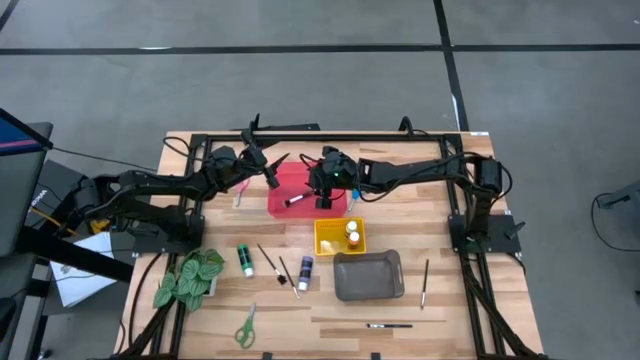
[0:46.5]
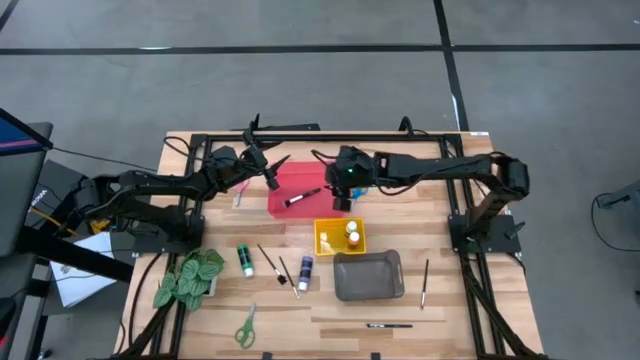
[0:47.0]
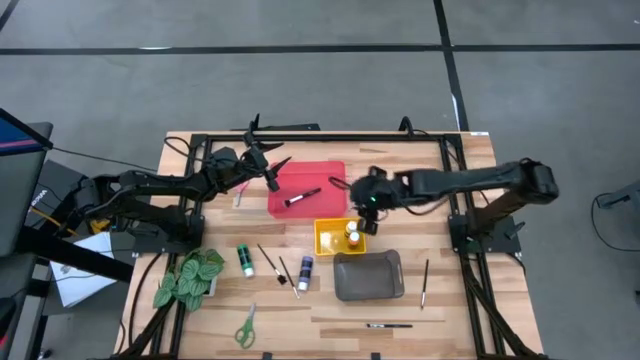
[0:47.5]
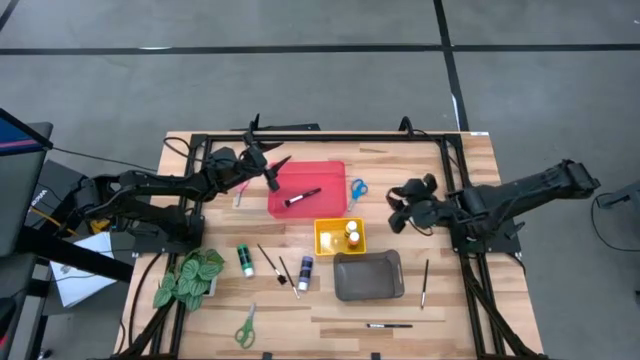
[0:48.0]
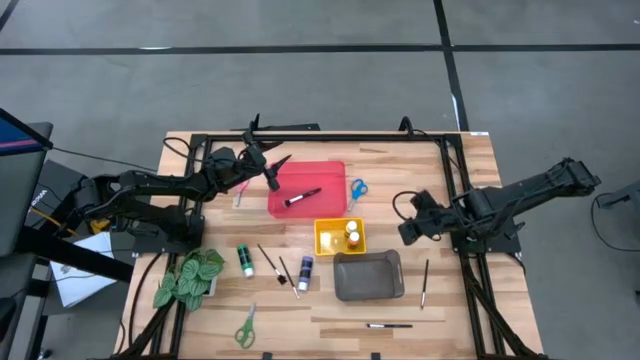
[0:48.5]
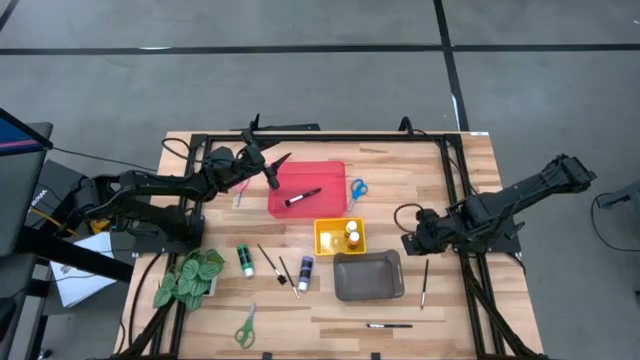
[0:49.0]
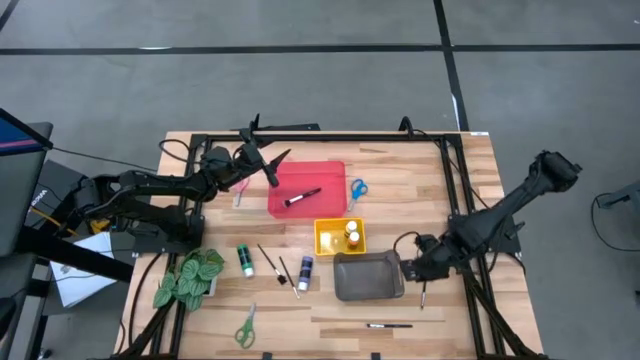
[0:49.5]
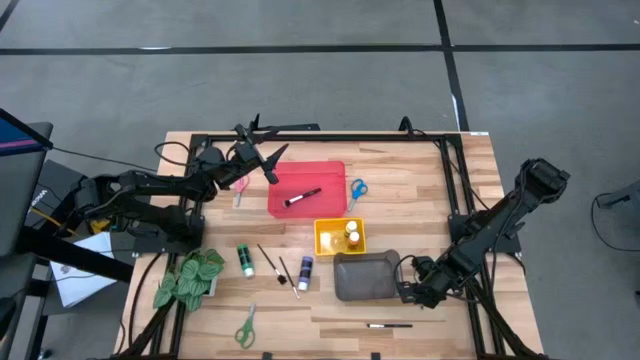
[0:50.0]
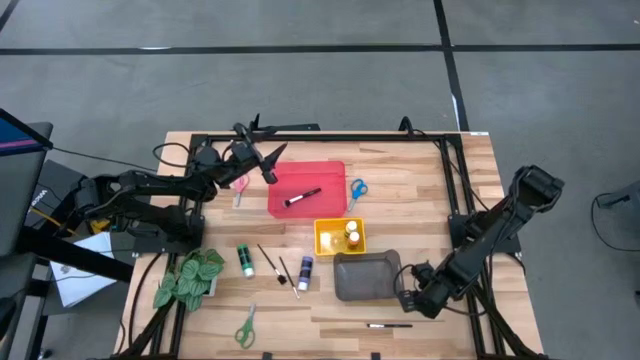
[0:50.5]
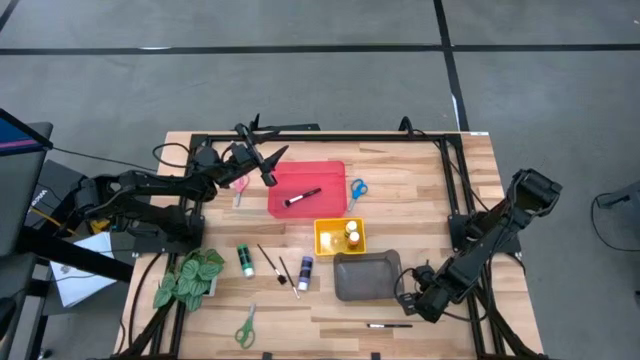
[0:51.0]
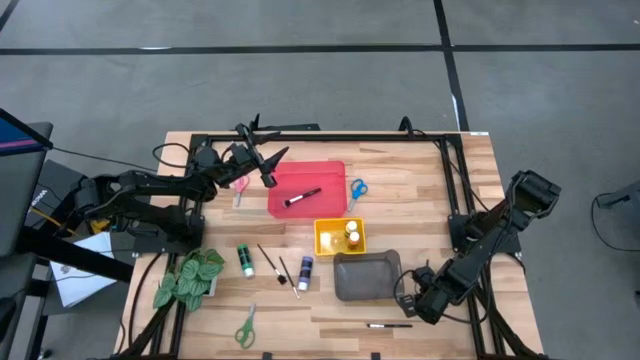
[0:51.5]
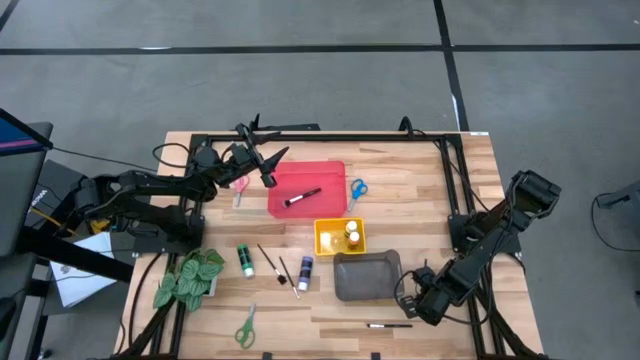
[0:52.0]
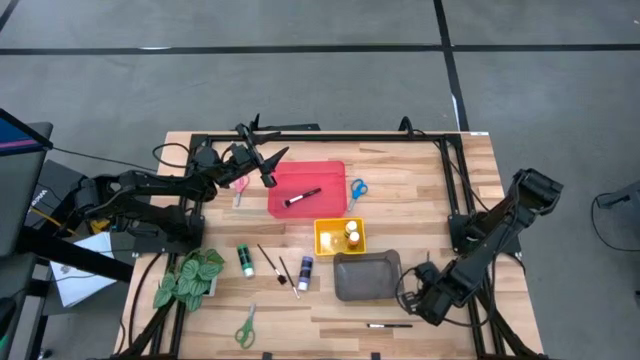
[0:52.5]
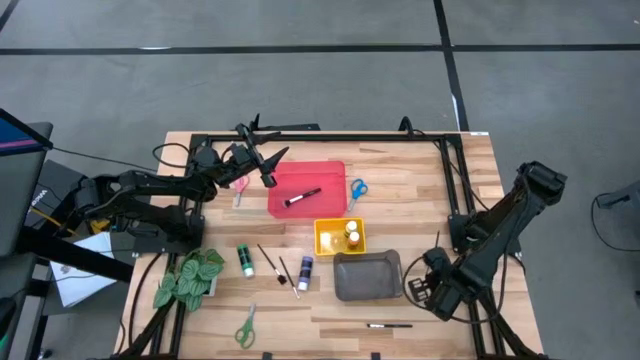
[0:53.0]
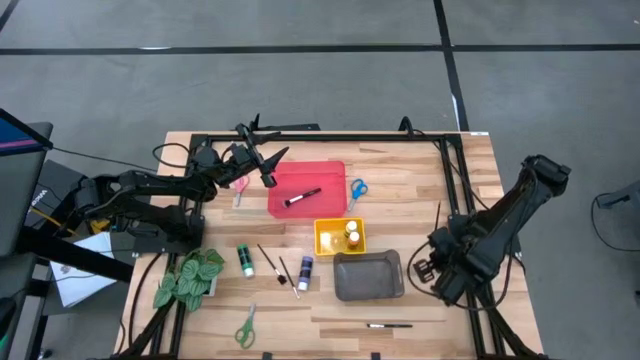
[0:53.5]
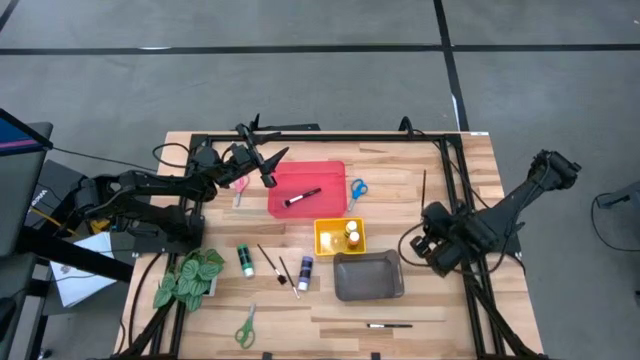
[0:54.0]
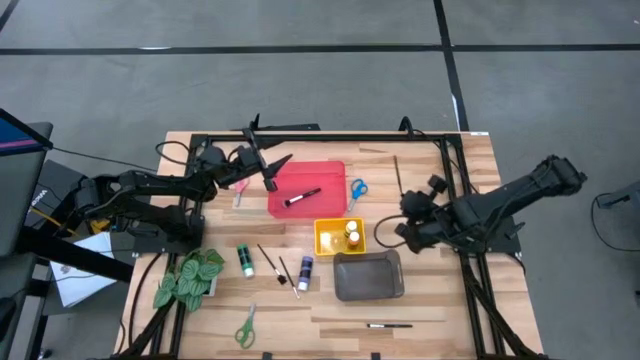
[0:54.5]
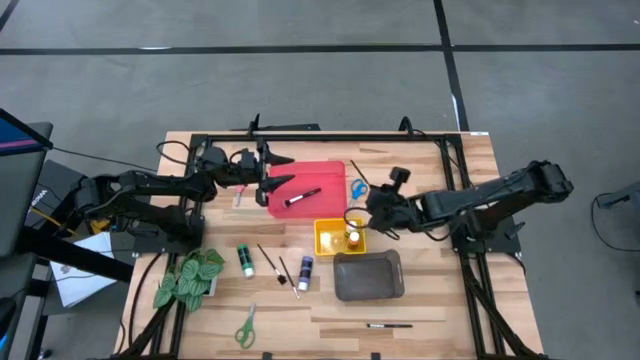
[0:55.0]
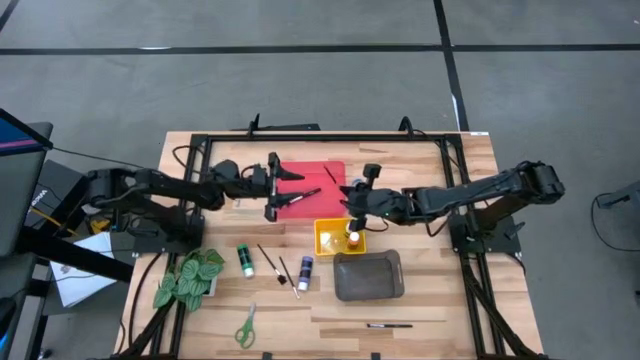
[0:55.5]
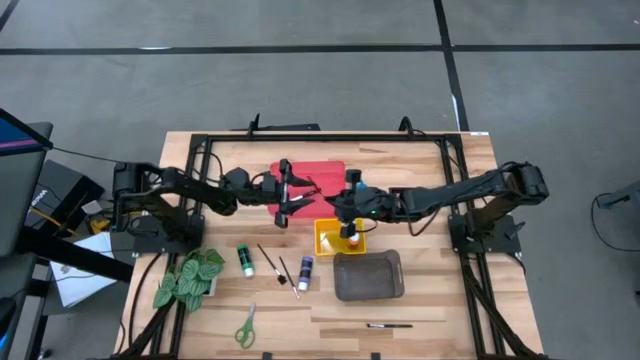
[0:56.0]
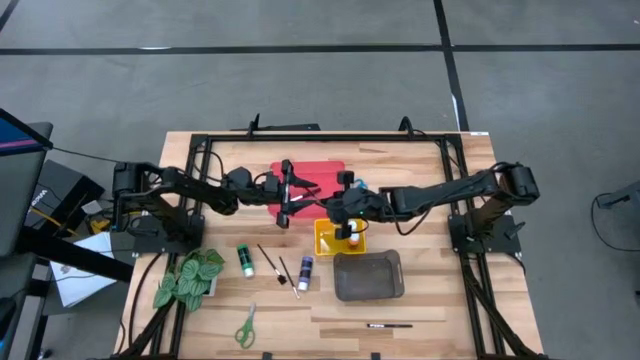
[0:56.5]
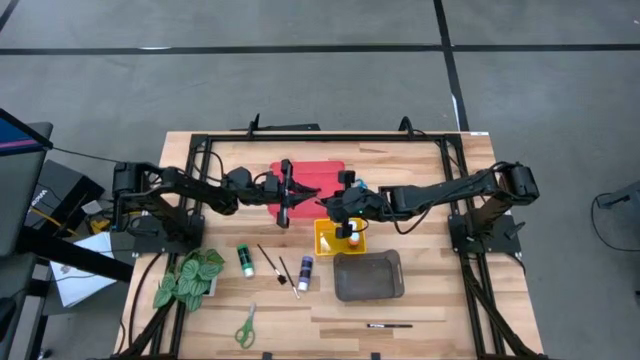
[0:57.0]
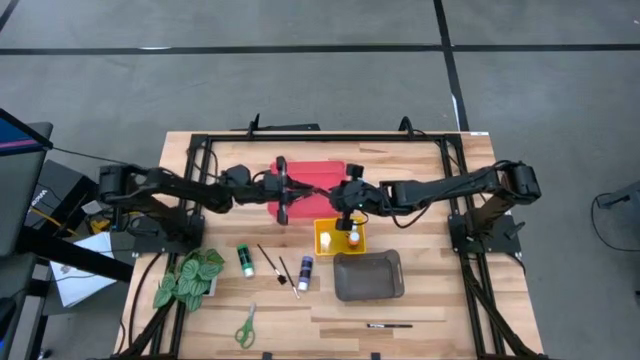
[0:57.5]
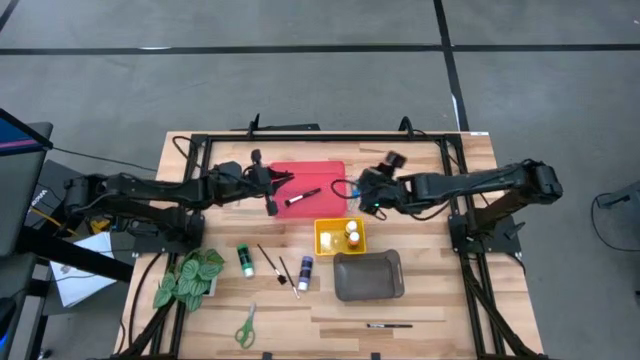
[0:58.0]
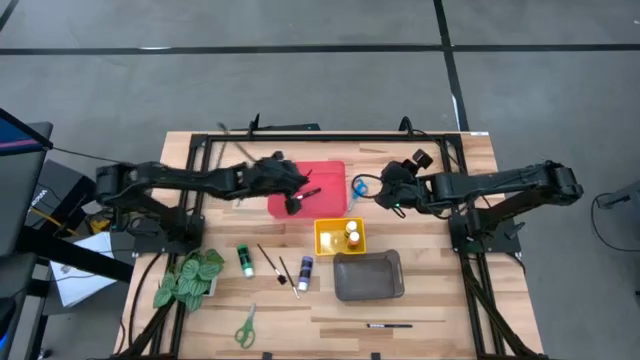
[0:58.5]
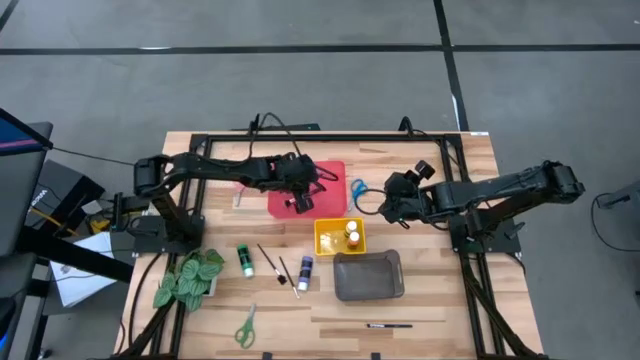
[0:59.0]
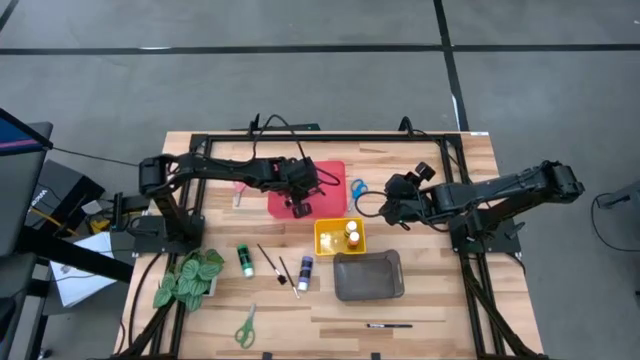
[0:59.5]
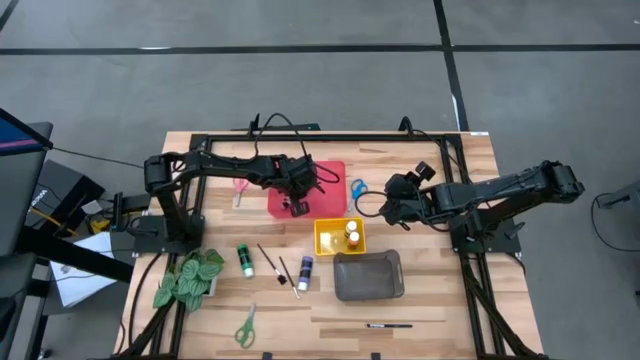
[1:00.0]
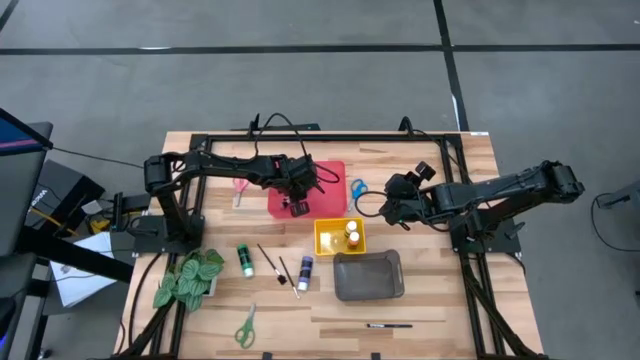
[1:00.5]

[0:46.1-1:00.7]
Task: Pick & Place Paint Supplies
Put the top right eyeshadow brush into the red bin

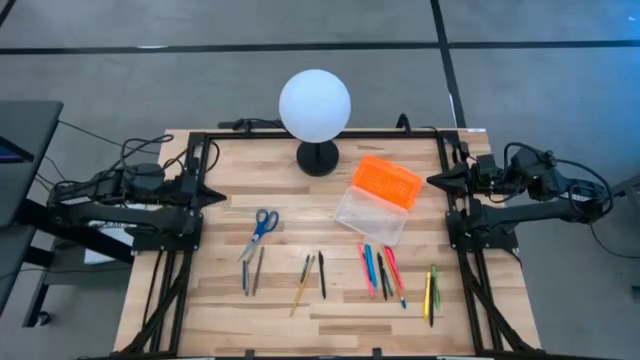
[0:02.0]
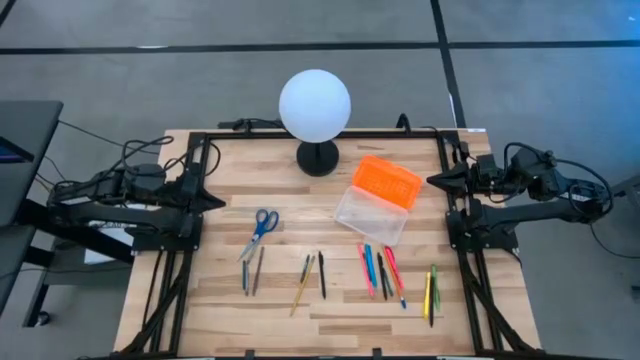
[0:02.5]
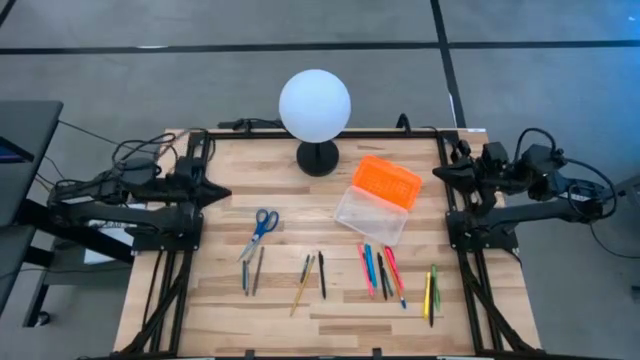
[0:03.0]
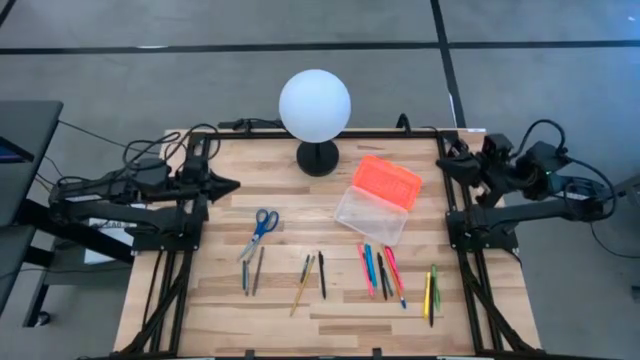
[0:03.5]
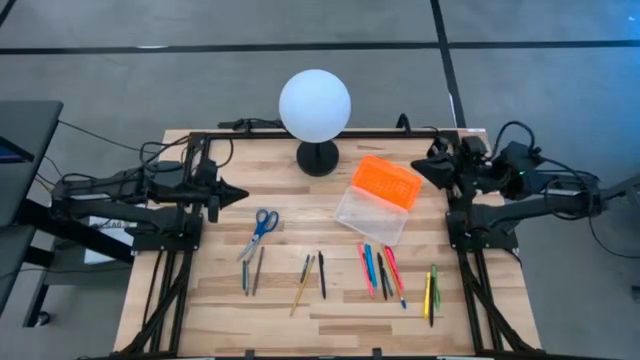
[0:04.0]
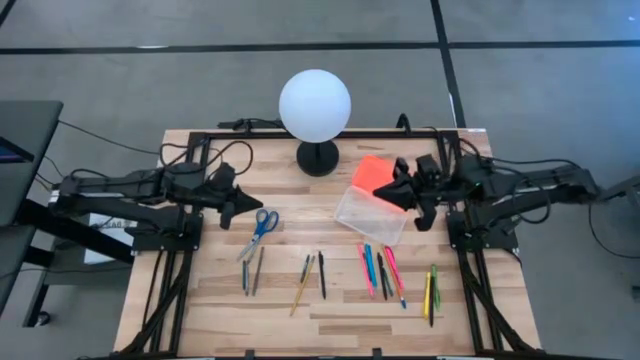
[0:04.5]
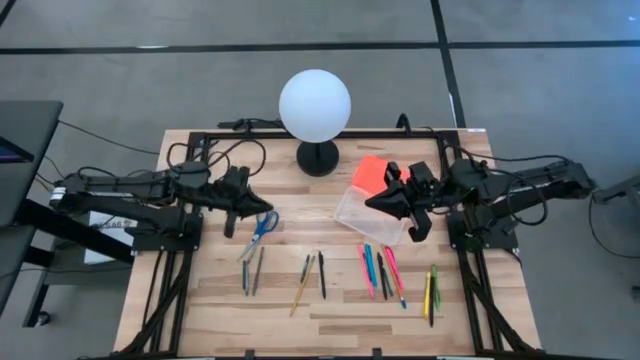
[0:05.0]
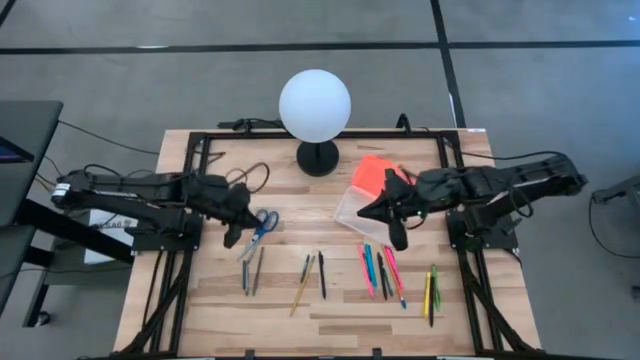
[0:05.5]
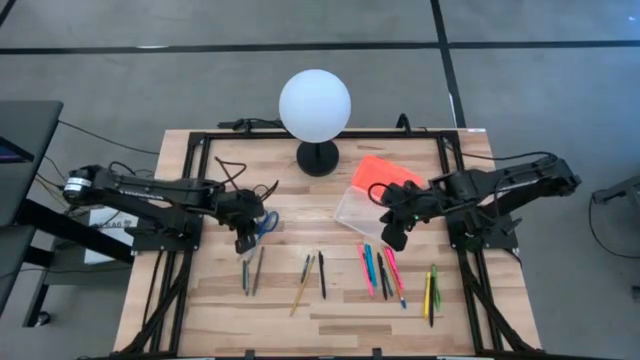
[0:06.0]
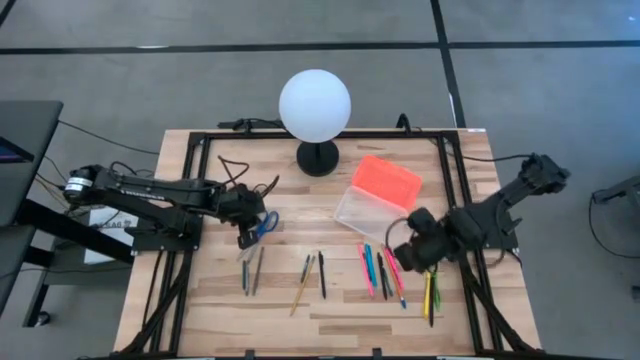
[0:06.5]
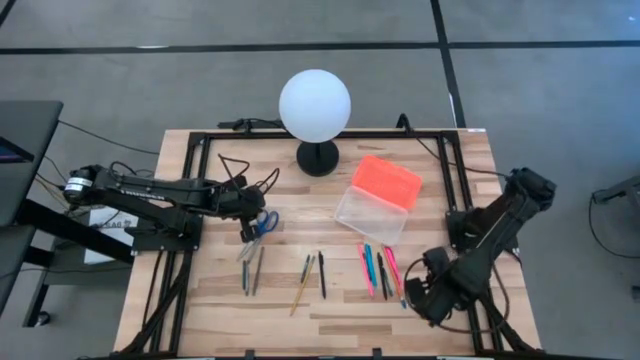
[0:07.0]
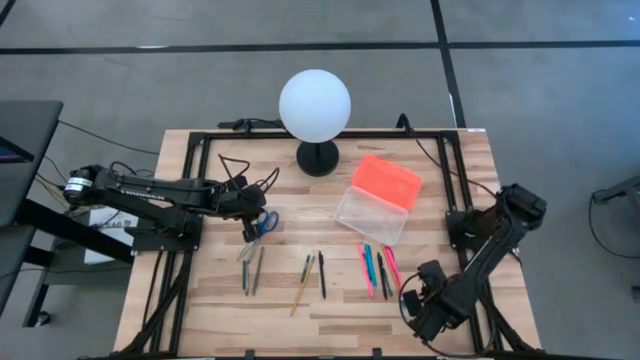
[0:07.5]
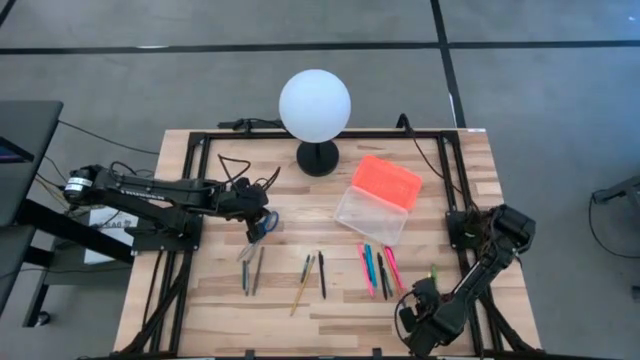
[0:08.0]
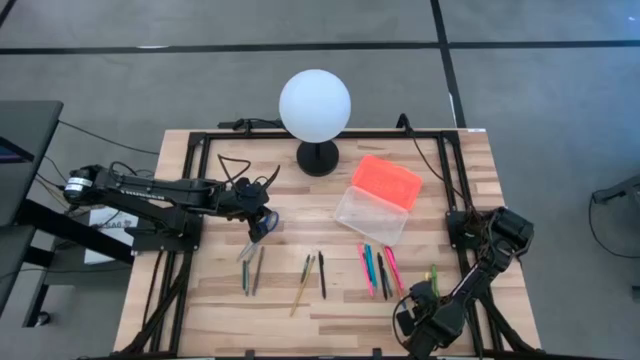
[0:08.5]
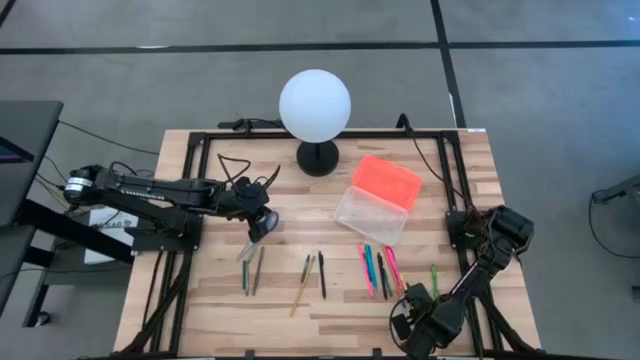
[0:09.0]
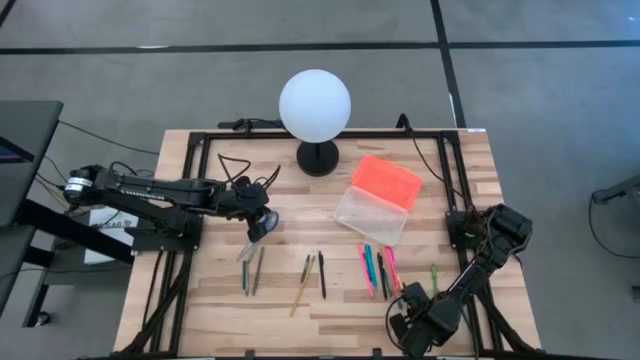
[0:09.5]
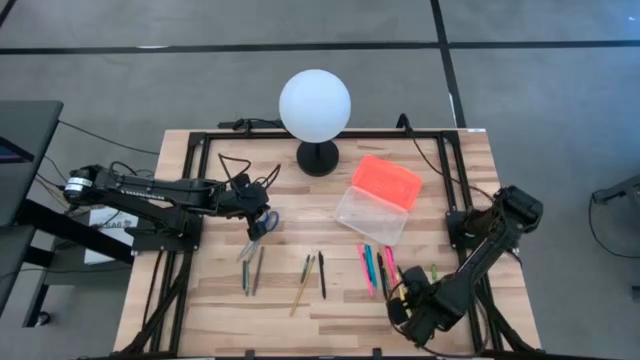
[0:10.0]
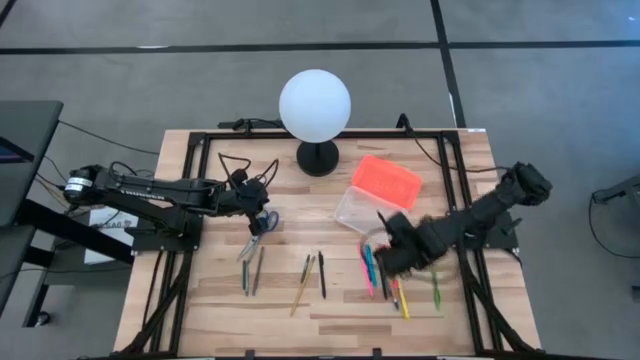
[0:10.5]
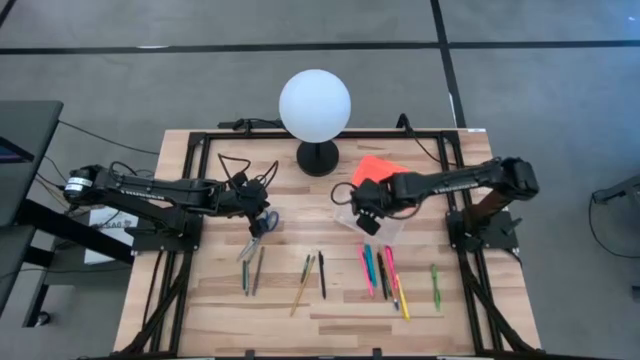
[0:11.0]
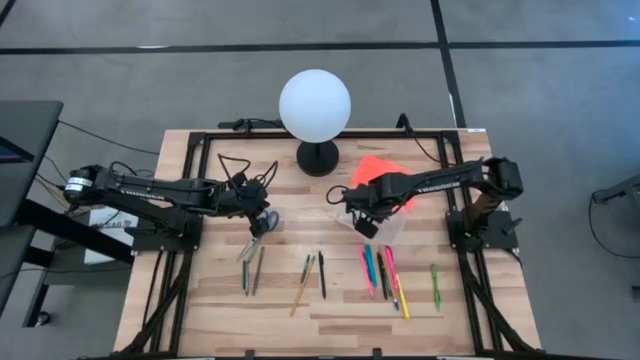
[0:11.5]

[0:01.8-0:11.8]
Task: Pick & place school supplies into a supply box
Put the black pen into the orange supply box
